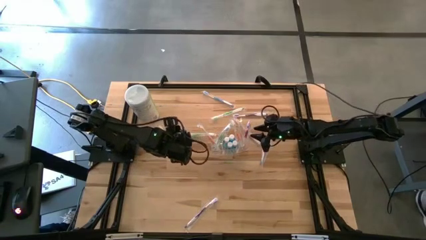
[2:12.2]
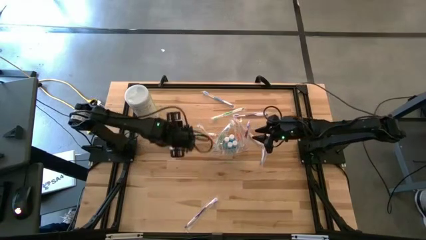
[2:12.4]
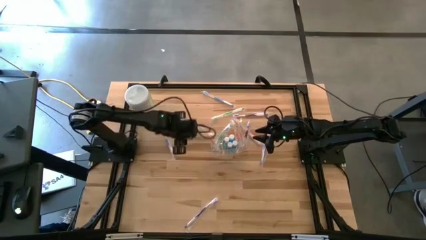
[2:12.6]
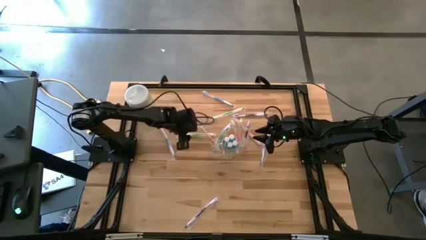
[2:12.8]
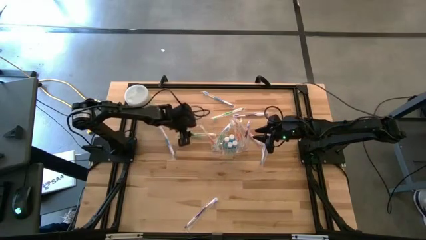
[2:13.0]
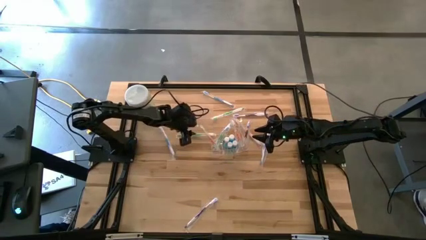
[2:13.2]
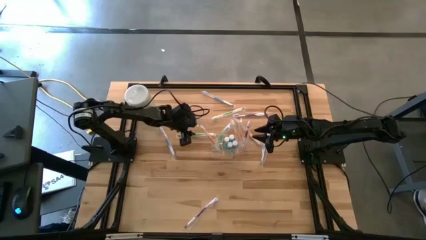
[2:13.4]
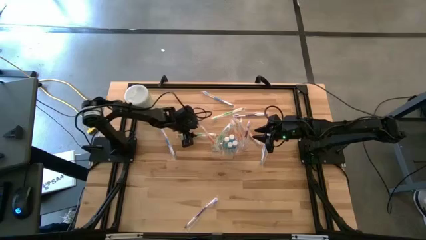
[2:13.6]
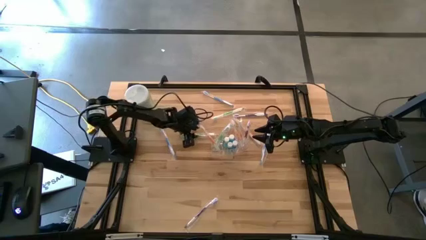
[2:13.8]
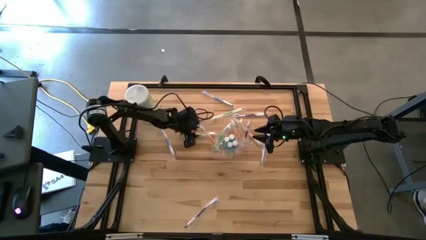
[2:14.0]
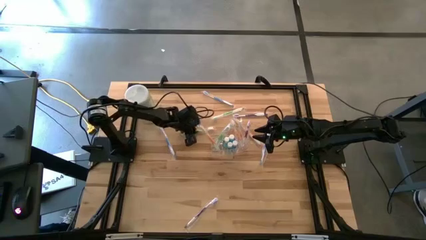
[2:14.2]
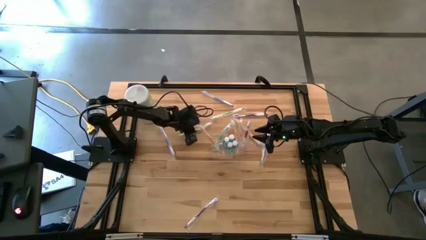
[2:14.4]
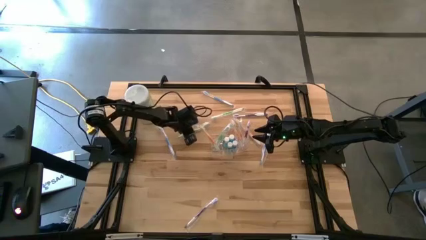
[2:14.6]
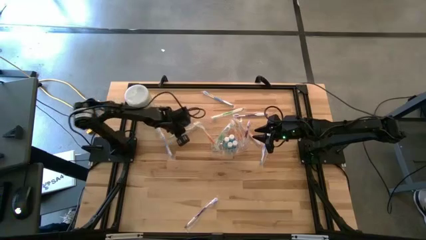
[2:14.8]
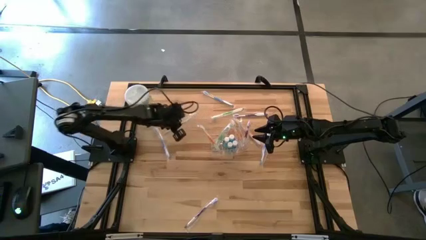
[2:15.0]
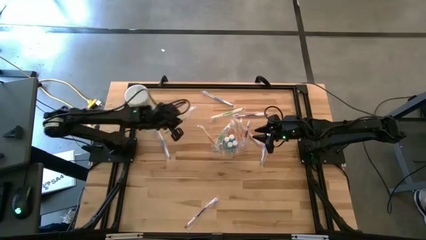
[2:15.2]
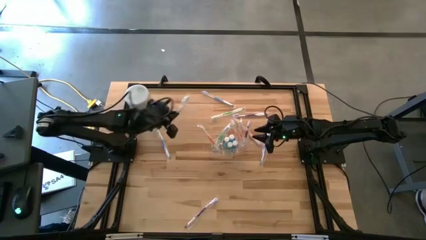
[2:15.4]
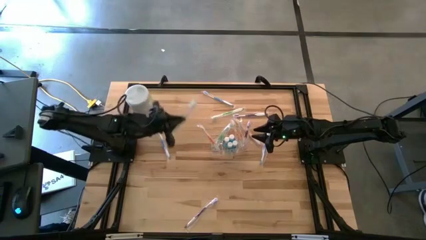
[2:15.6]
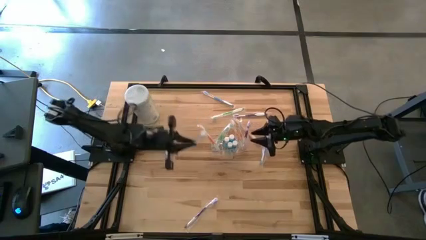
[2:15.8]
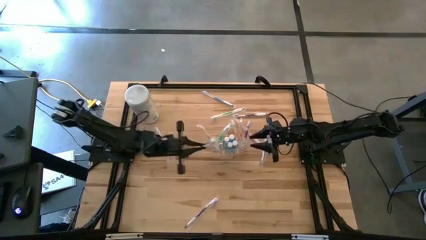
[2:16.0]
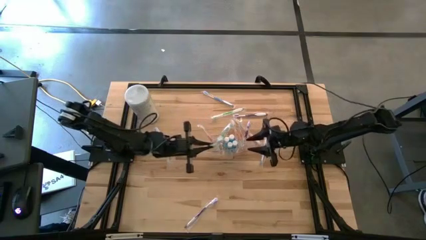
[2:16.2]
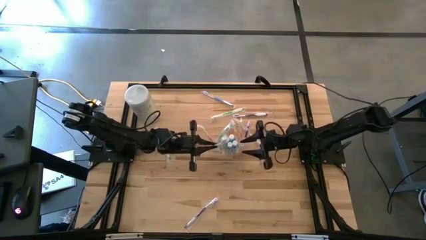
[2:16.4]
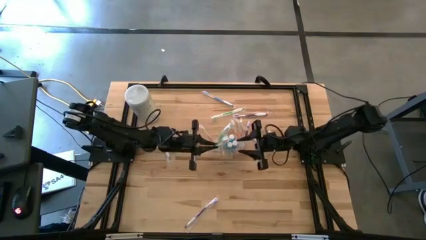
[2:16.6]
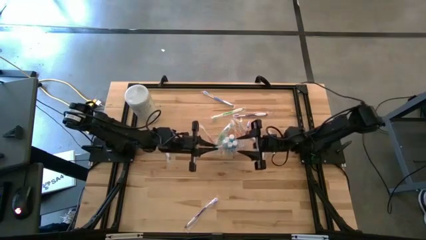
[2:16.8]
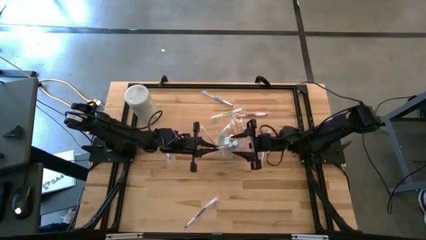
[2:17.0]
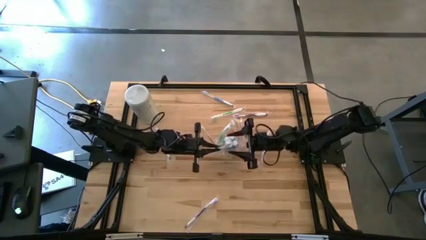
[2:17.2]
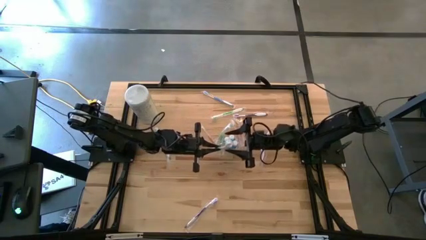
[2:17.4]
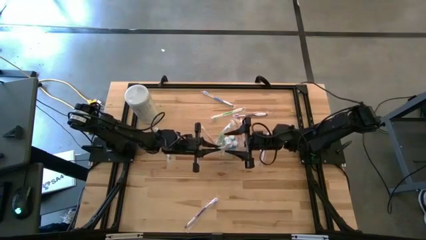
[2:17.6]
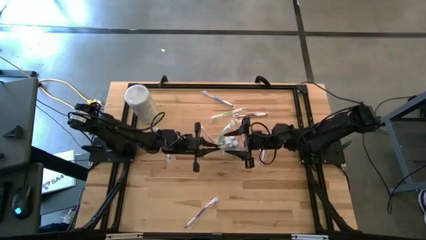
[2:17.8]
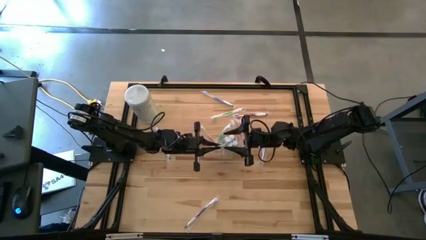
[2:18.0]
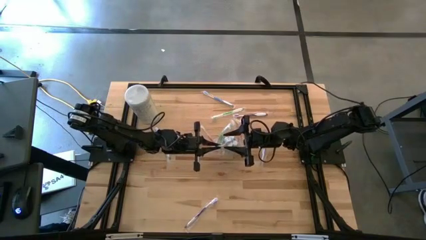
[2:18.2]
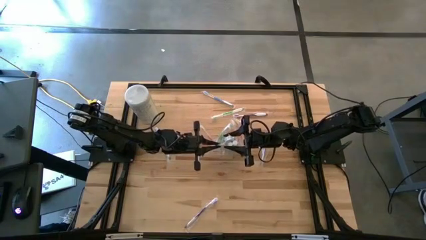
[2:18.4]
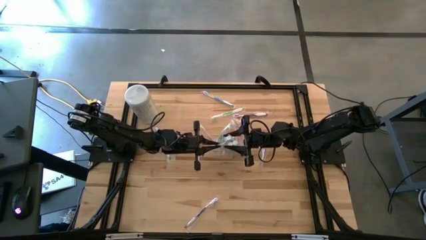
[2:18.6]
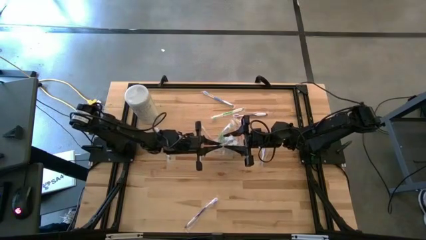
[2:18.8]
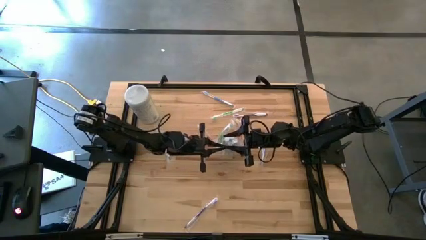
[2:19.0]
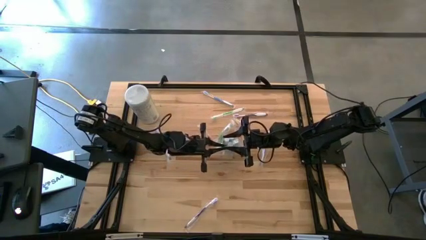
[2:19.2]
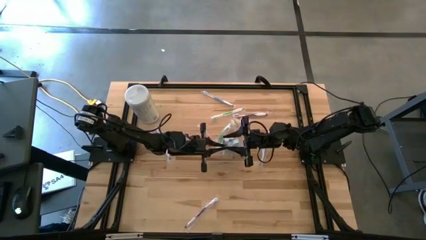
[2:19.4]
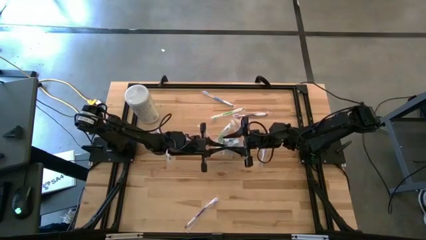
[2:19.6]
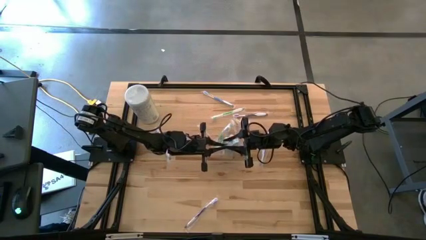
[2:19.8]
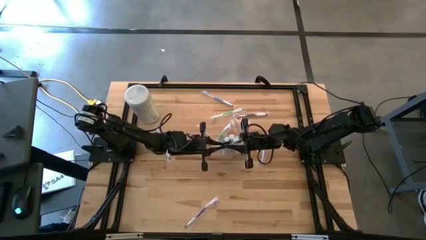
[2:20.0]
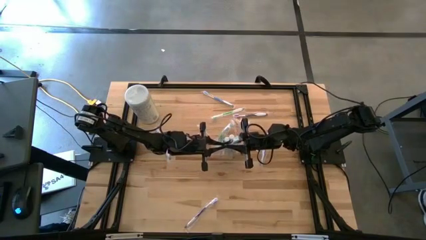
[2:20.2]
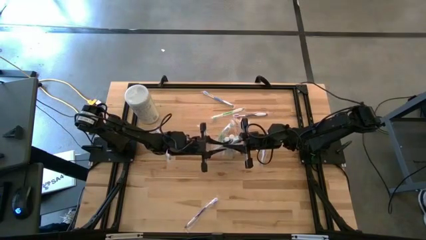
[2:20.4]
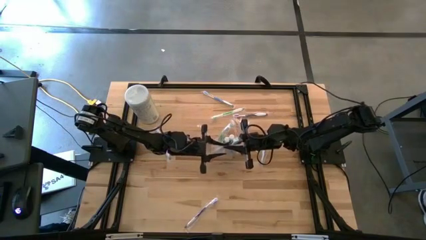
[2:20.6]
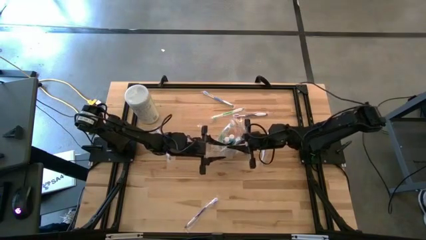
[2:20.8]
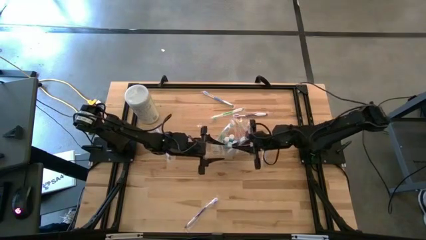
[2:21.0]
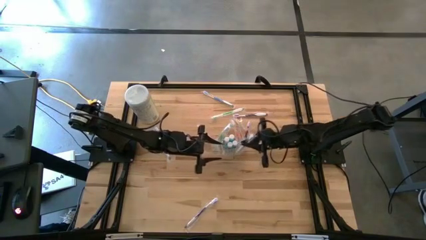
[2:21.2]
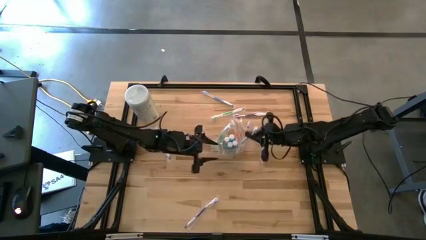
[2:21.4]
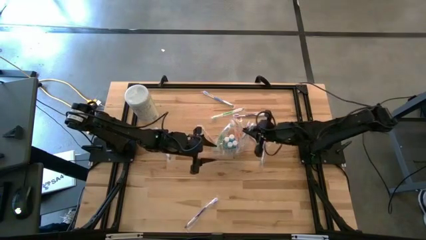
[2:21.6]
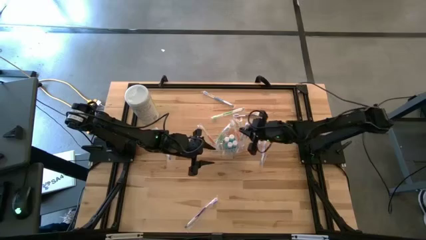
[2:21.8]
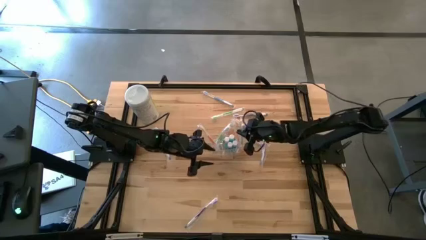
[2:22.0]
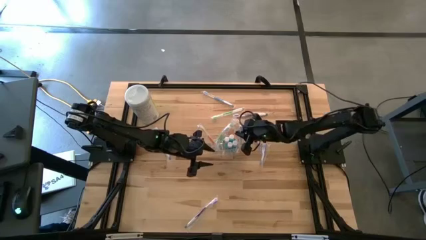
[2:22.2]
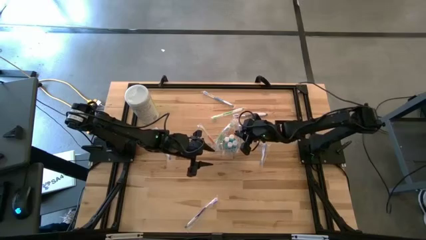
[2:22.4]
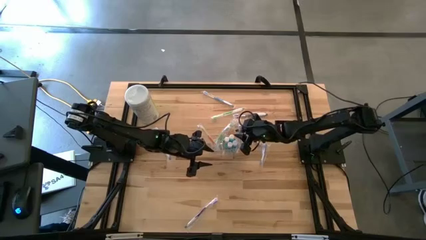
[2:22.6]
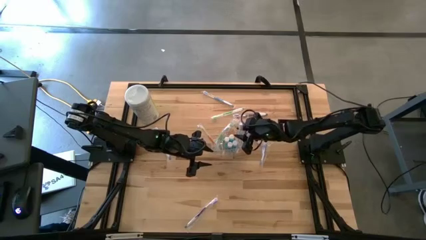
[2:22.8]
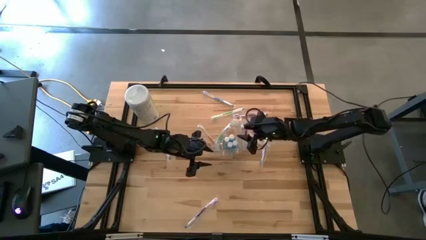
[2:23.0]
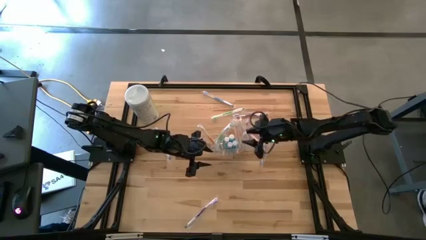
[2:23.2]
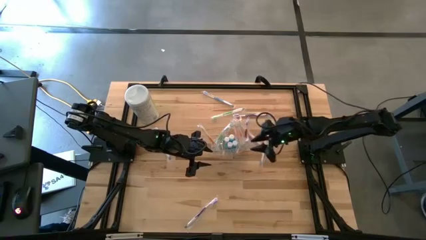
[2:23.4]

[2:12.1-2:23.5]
Task: Pick & Place toothbrushing station
Put the green toothbrush into the transparent organizer

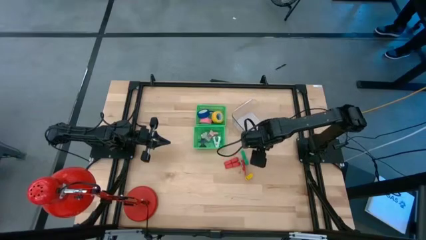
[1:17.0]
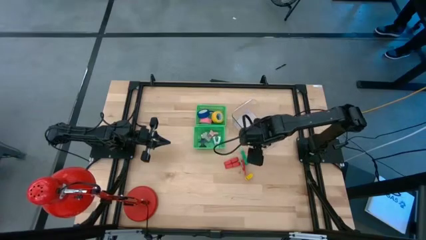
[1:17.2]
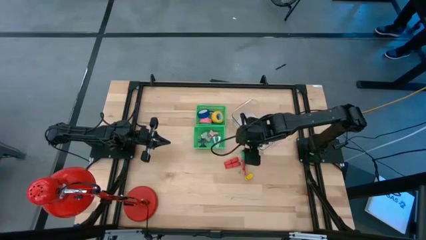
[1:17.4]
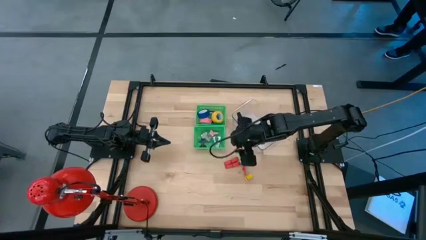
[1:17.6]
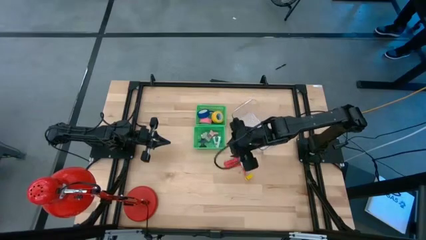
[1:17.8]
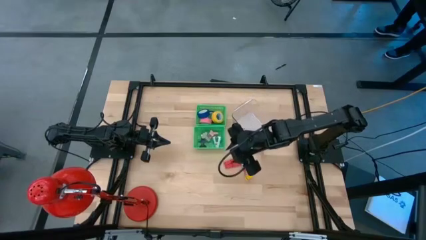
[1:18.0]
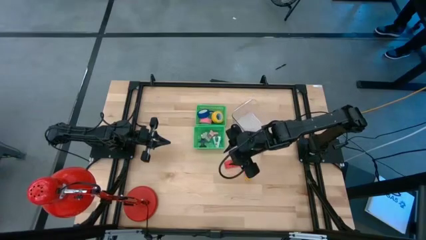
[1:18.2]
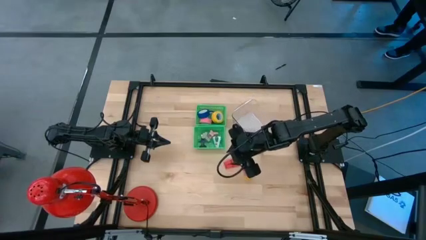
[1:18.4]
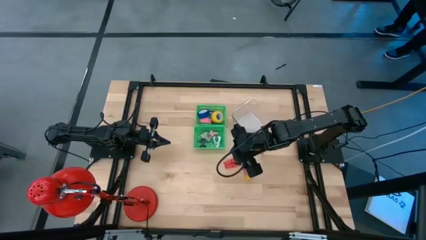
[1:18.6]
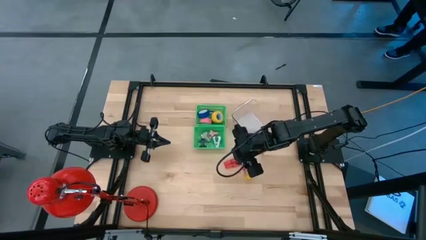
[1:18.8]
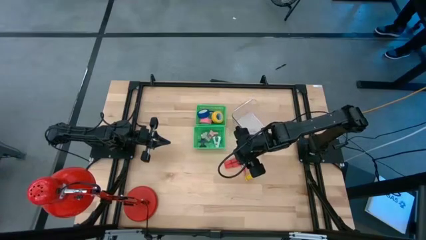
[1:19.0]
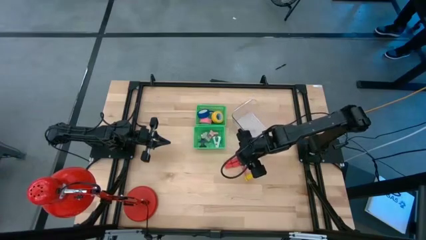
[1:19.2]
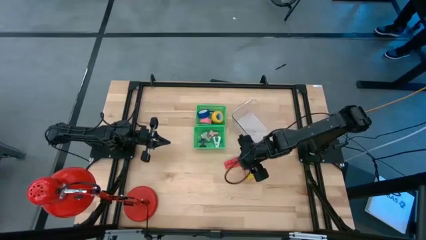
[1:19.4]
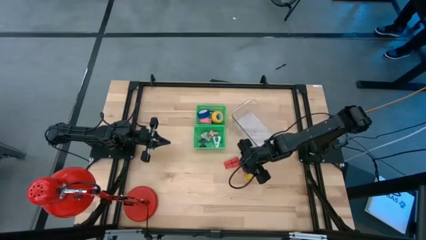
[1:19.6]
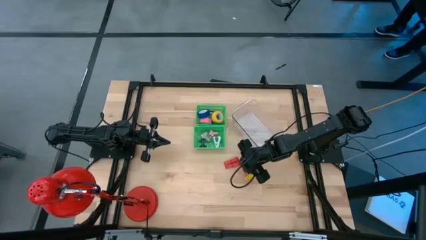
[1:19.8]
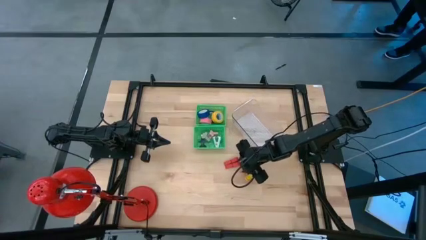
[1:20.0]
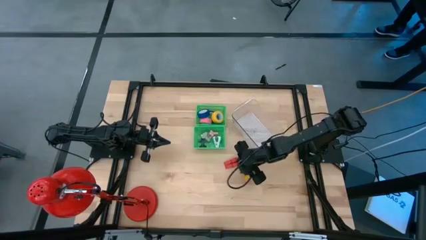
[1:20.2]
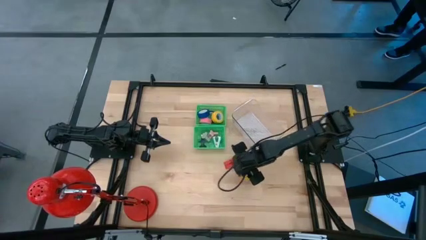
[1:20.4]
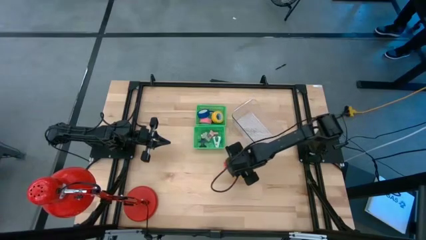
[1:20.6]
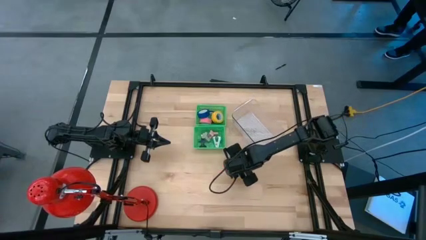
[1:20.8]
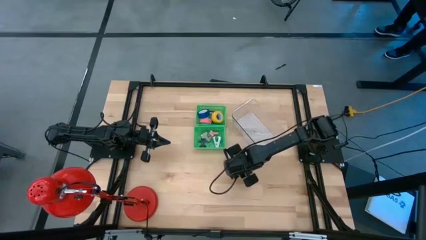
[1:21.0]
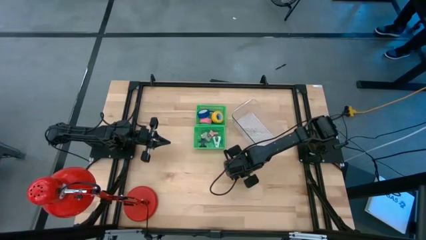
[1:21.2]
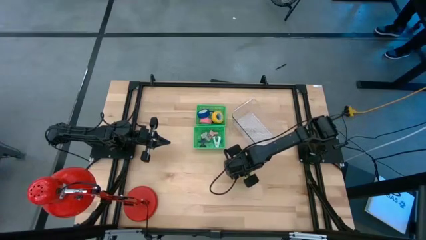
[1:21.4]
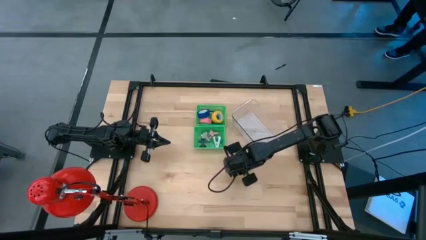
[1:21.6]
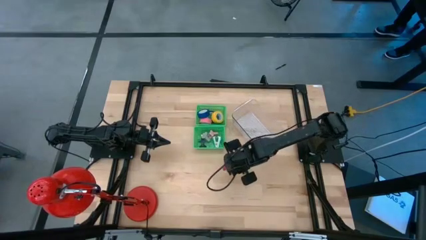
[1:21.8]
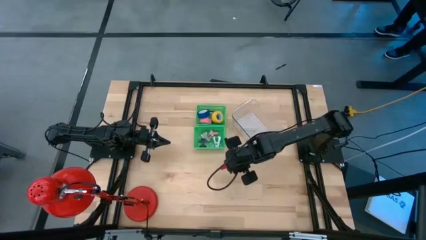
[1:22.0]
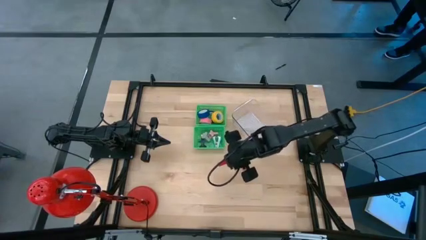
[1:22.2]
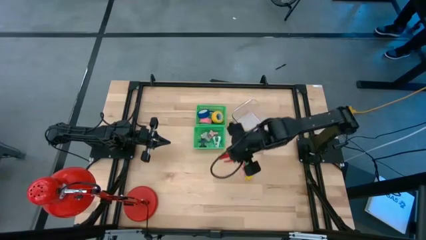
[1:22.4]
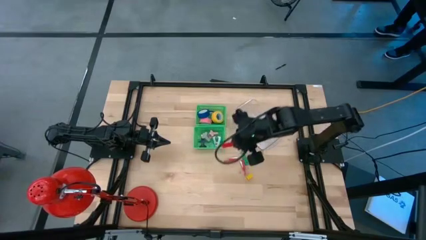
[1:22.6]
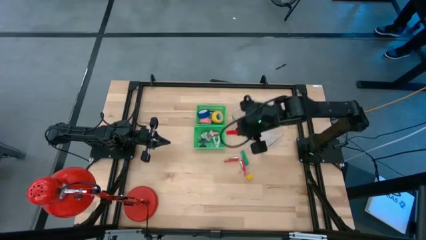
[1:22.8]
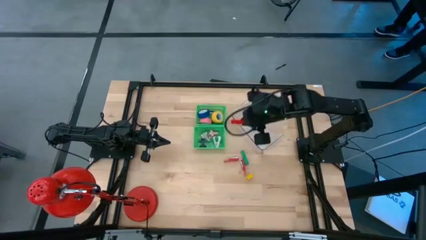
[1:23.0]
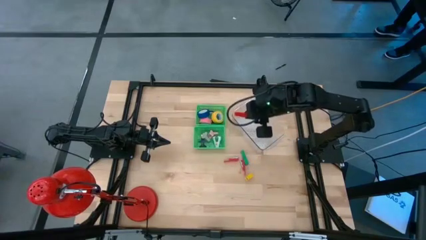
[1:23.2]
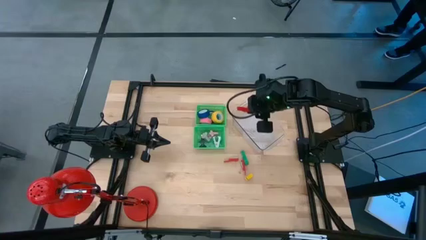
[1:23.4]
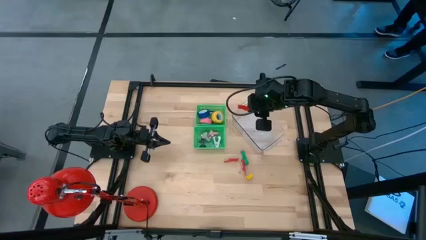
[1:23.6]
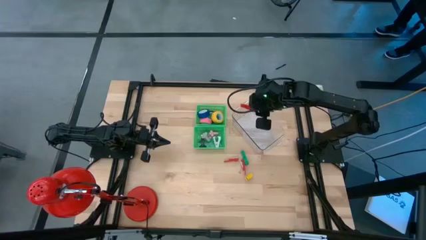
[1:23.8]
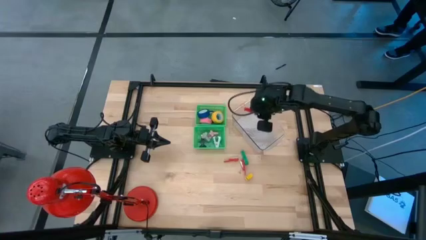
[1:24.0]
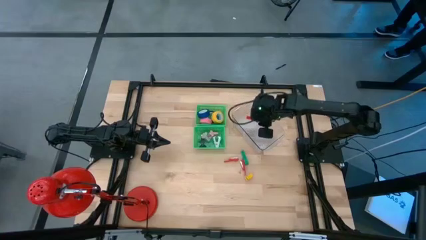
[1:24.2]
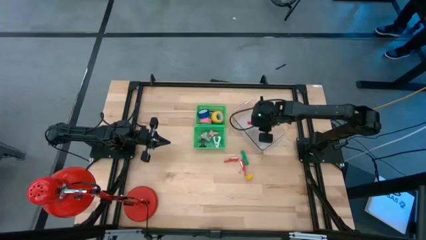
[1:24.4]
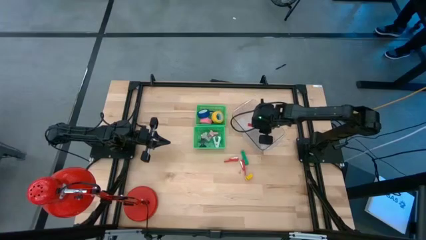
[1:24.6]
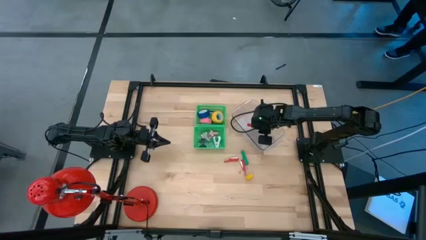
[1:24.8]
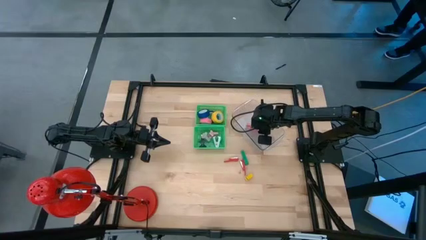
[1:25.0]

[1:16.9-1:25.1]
Task: Pick and place Stapler, Stapler remover, tape
Put the bottom left red stapler into the transparent bin
